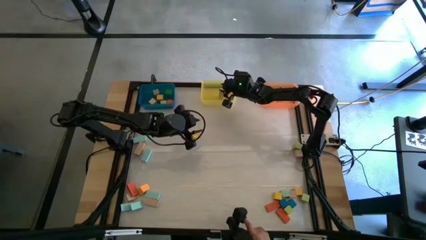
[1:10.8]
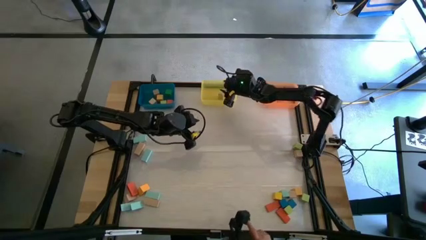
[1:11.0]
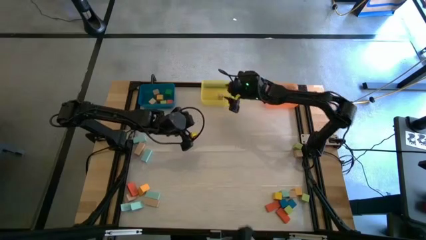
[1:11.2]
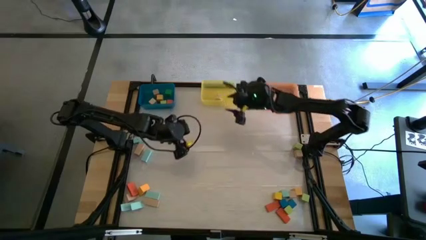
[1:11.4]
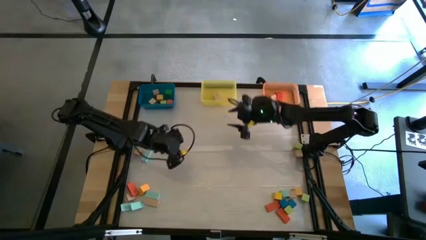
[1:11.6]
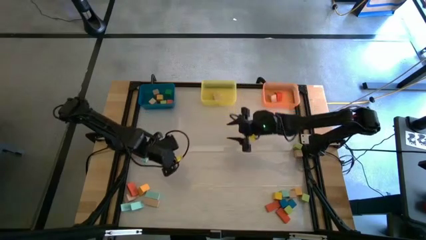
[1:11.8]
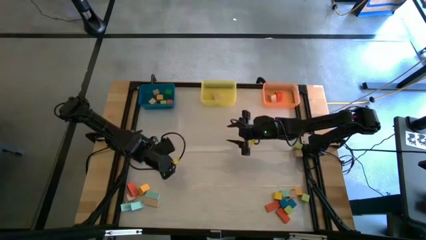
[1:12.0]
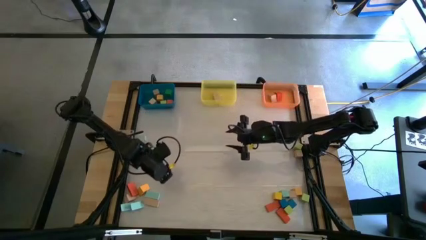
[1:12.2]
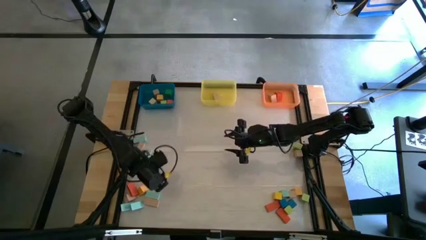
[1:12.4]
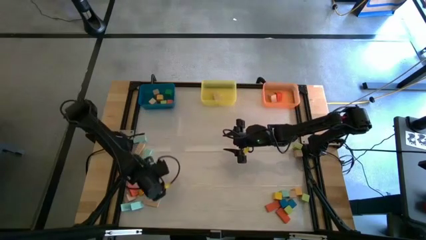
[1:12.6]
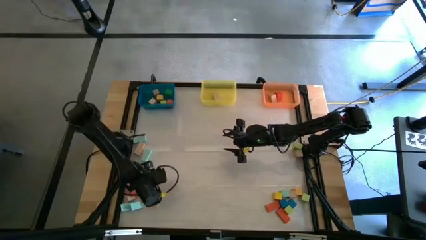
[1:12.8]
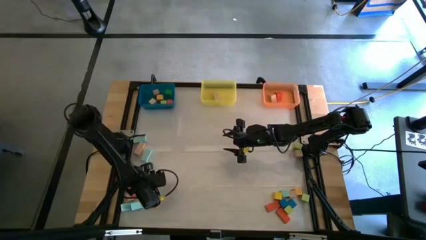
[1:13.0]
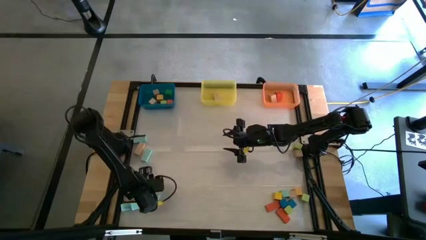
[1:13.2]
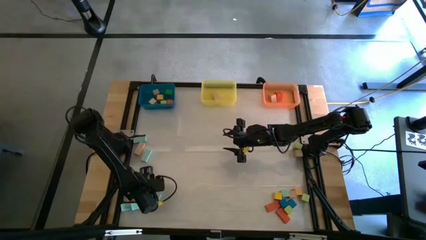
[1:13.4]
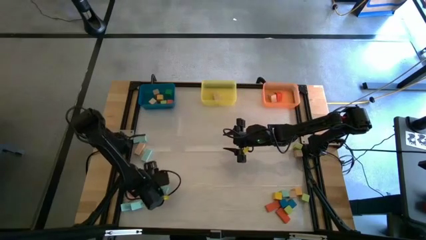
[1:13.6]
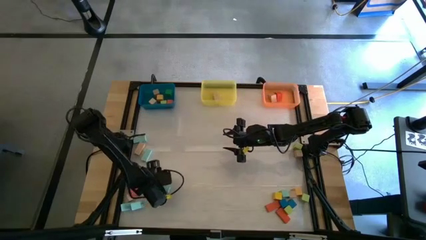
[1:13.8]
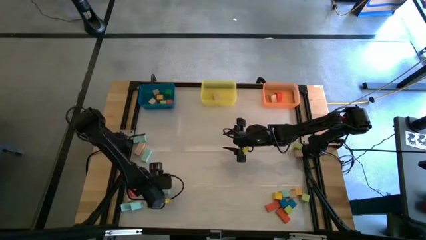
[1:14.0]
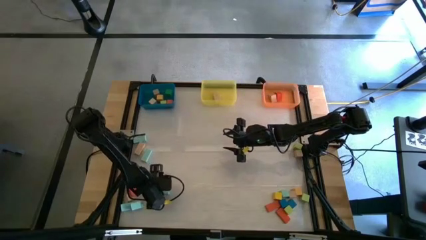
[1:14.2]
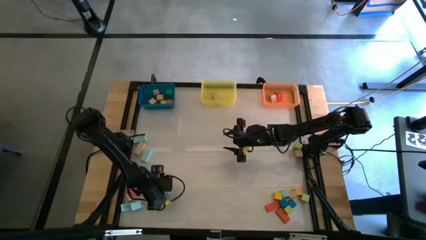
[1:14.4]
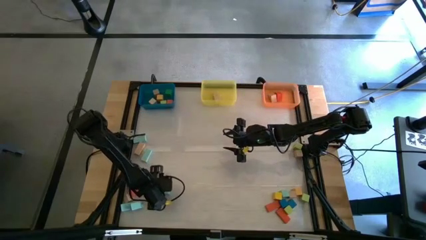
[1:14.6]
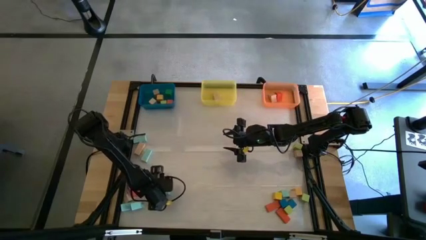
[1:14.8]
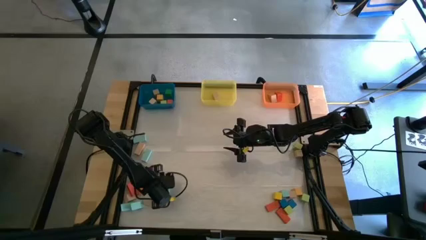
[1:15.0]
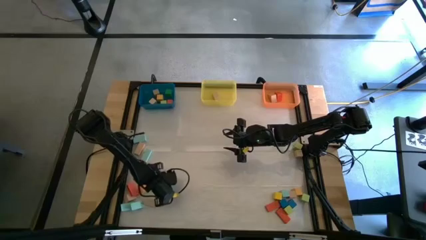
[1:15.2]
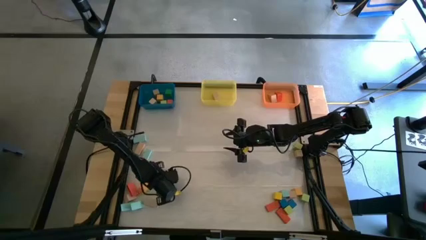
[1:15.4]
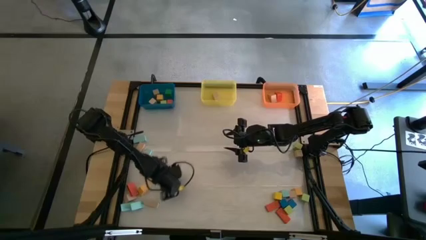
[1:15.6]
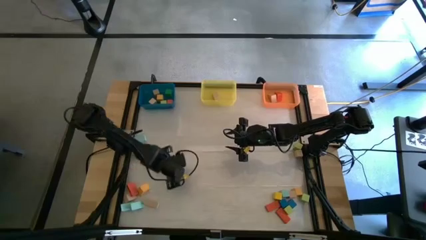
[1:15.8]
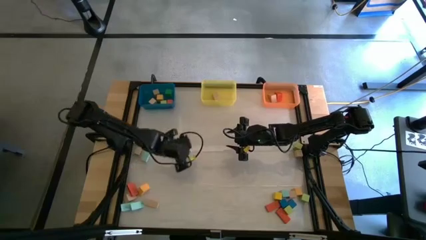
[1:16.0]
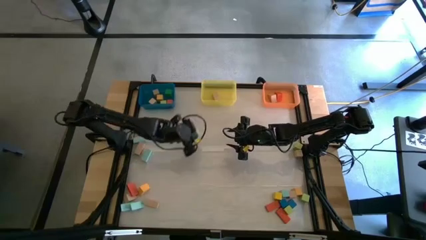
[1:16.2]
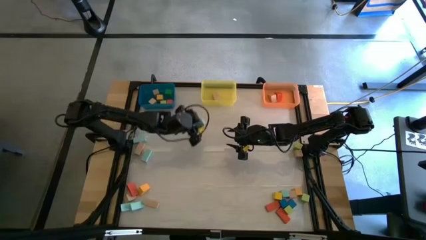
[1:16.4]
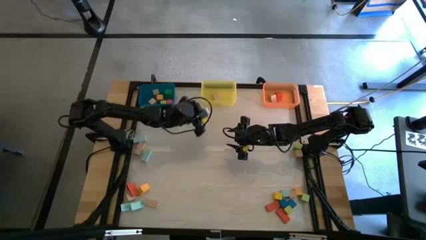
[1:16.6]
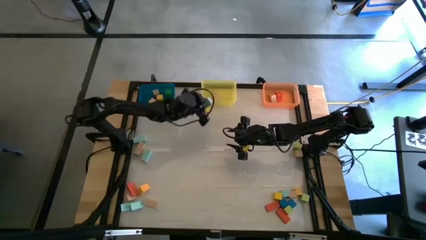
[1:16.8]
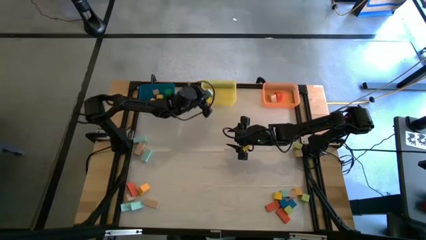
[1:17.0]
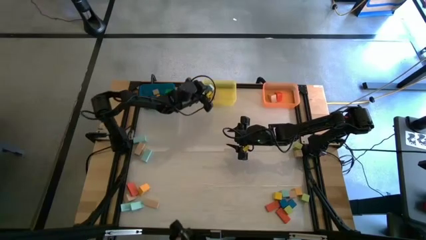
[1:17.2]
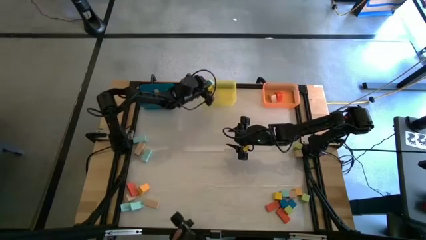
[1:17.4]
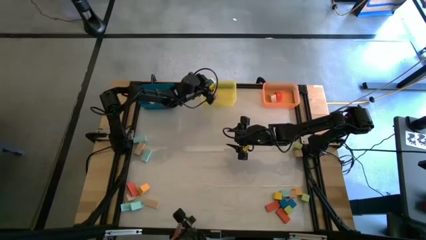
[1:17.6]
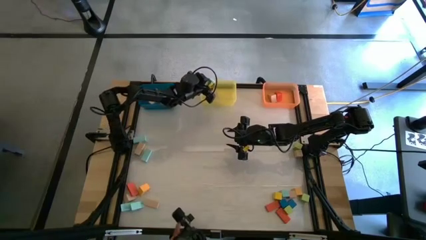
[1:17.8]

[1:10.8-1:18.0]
Task: Sort blocks by size
Put the light blue rectangle block into the yellow bin

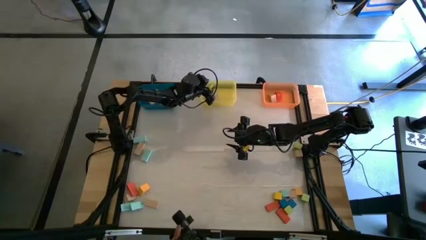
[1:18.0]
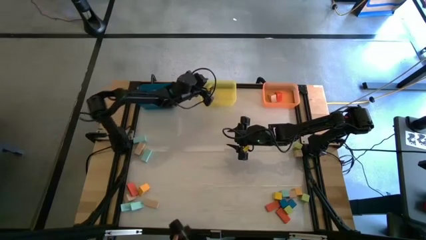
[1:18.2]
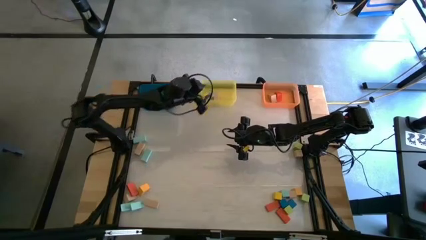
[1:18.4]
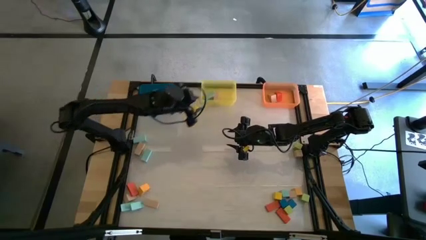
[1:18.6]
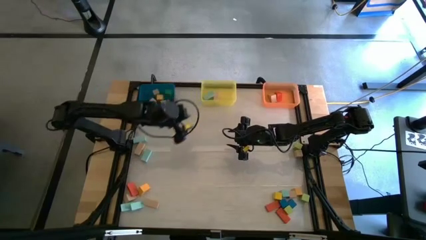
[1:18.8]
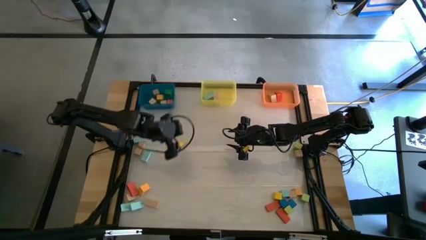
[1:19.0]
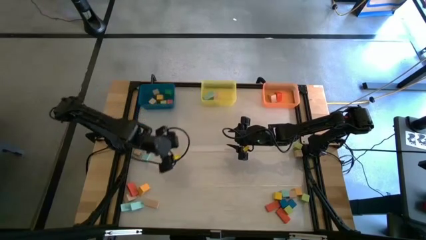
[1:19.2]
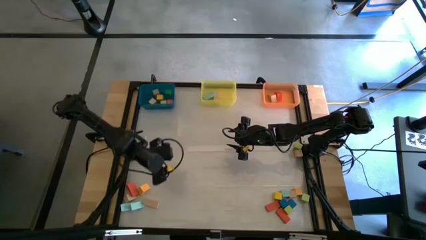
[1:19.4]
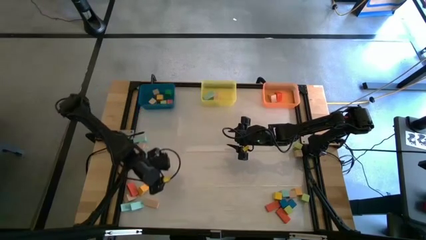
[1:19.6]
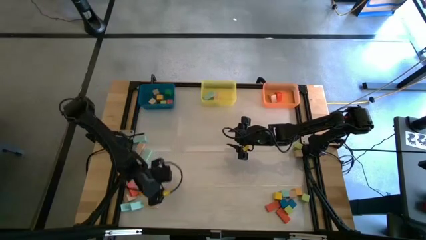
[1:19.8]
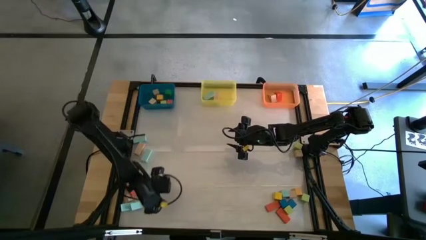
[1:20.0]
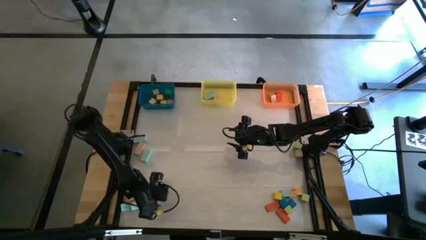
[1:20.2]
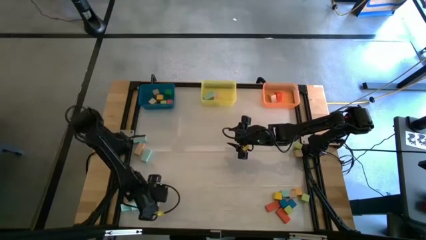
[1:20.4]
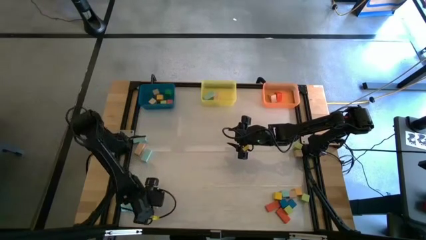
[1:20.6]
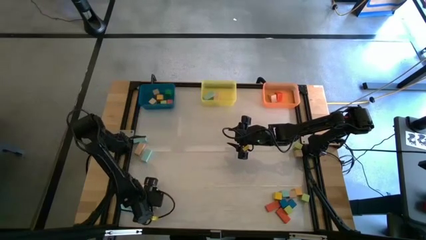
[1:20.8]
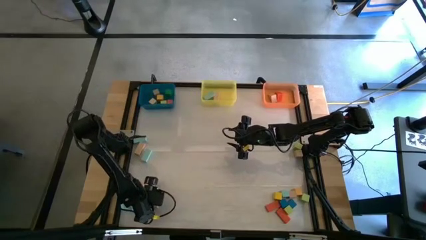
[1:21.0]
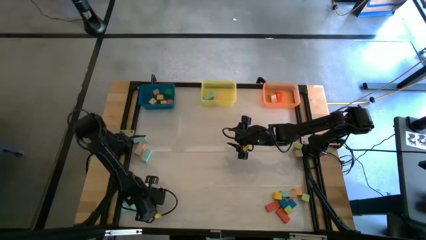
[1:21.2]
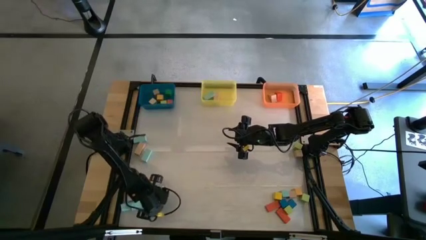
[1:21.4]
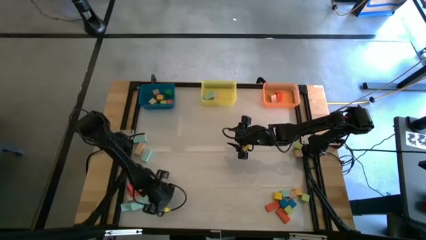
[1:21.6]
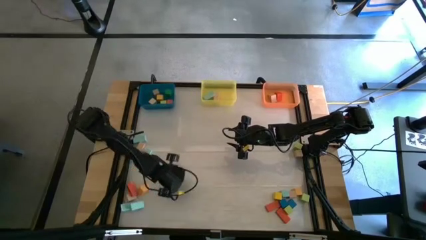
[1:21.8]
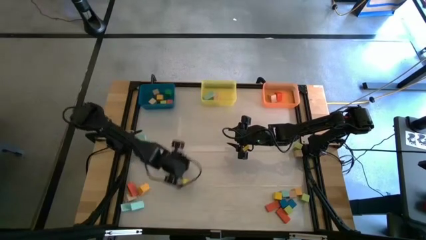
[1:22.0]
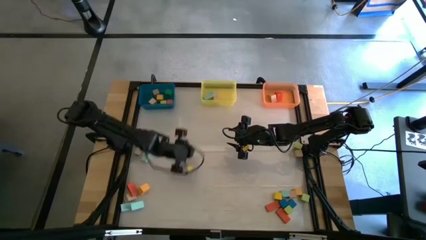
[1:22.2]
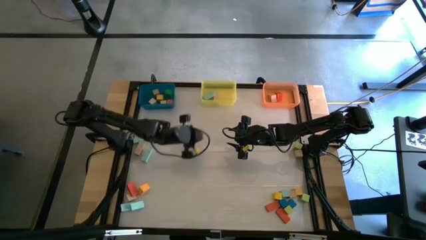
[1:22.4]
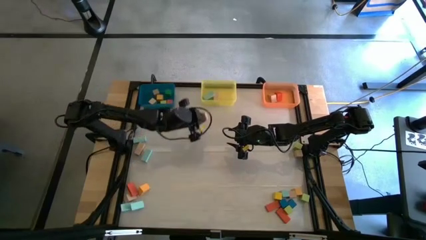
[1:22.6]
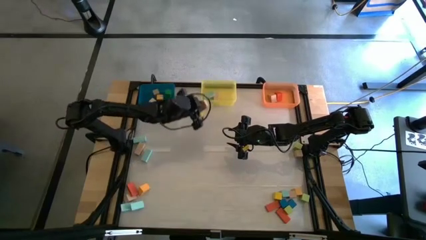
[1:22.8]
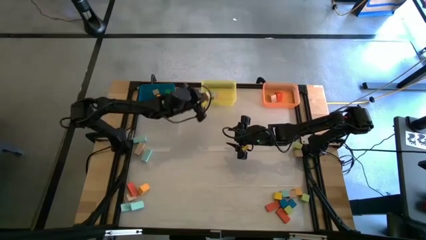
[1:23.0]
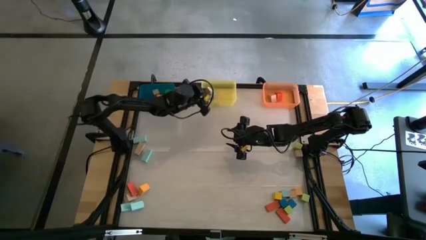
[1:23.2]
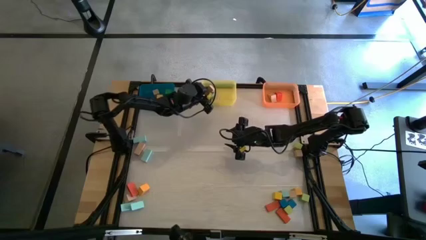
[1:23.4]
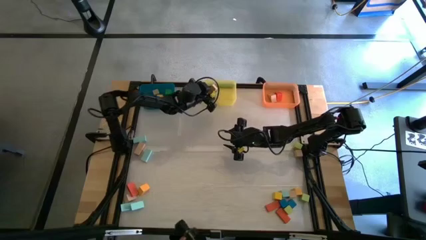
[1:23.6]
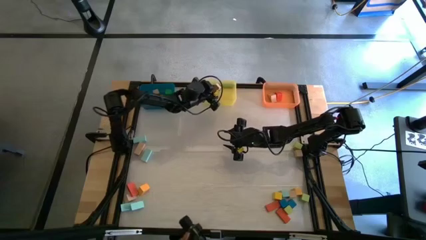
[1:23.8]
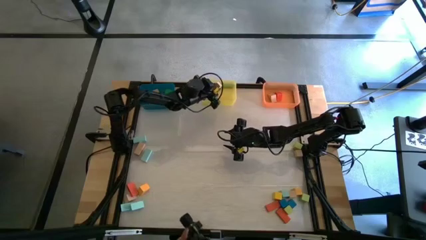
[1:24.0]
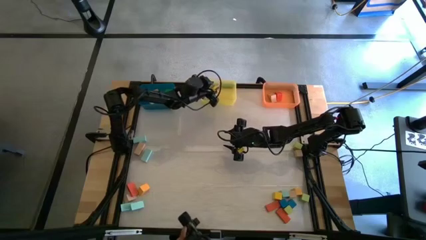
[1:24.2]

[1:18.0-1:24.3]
Put the brown rectangle block into the yellow bin

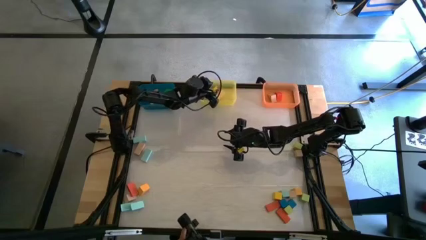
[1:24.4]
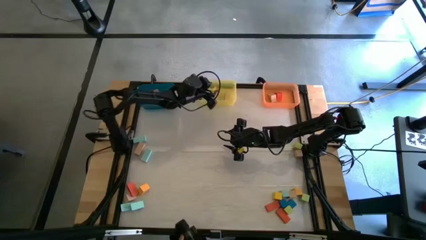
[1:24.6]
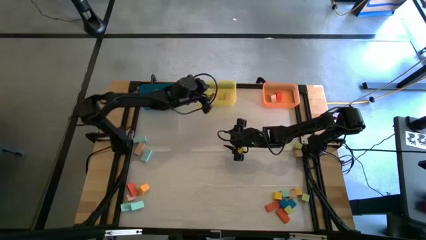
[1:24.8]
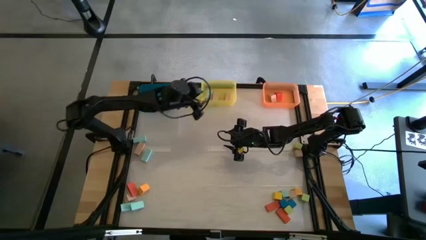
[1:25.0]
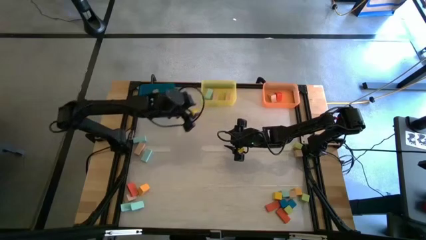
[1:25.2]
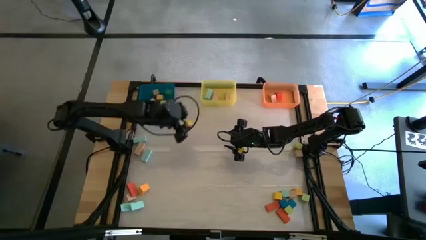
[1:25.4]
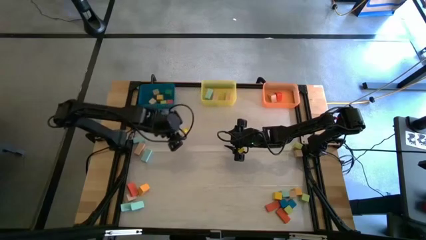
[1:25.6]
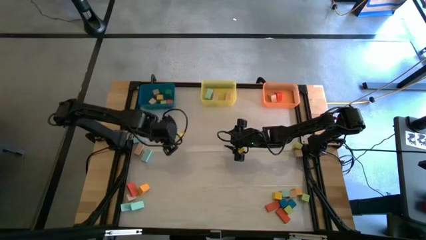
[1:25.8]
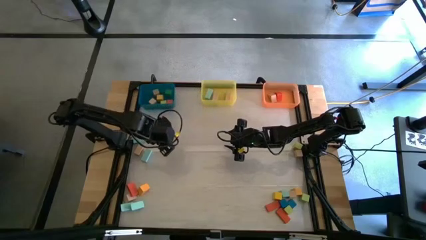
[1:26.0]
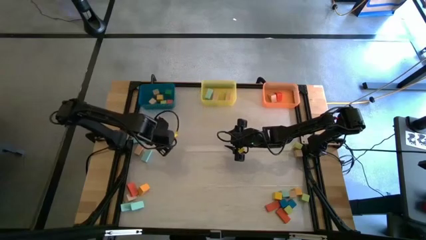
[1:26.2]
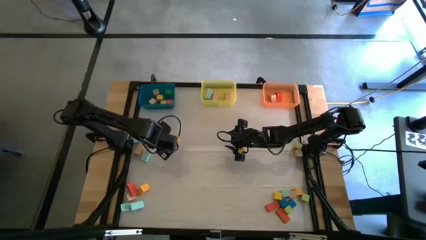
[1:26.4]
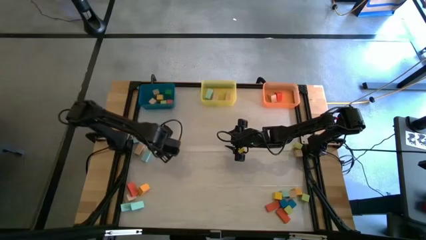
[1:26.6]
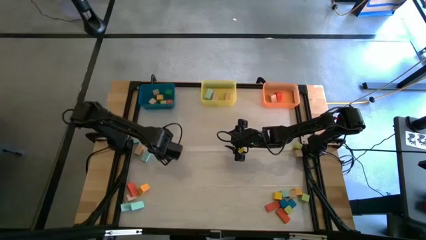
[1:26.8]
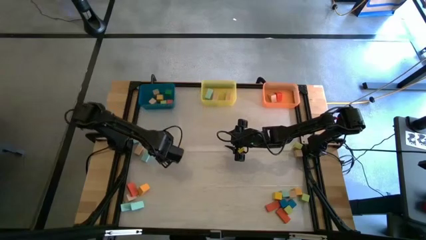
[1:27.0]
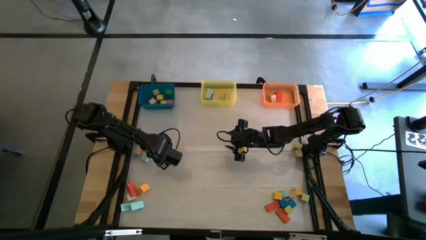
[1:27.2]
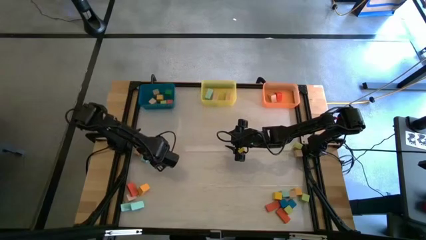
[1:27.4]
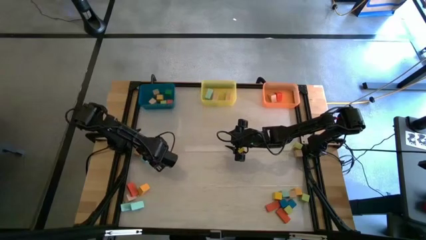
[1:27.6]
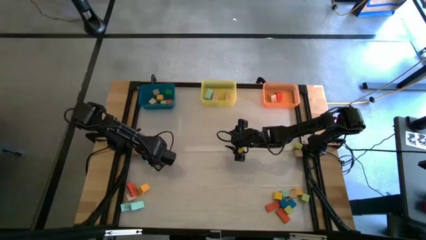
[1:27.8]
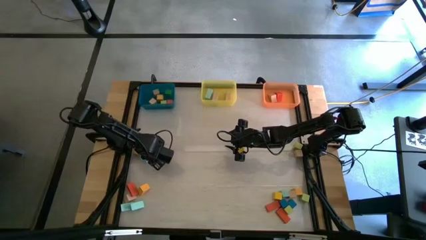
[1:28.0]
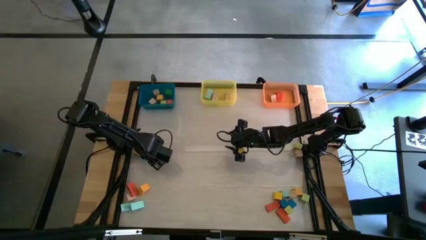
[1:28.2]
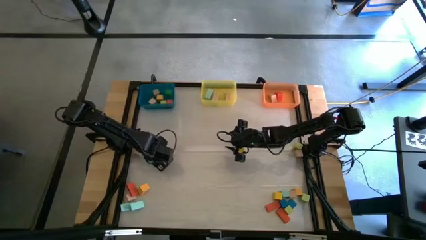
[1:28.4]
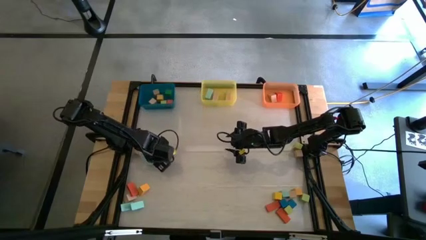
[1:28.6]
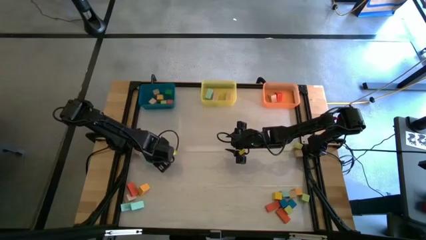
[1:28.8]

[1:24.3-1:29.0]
Put the light blue rectangle block into the yellow bin
